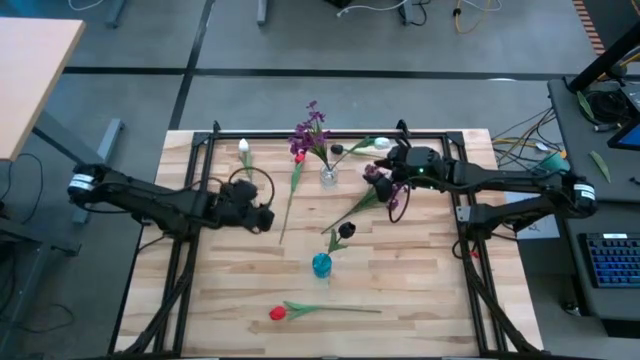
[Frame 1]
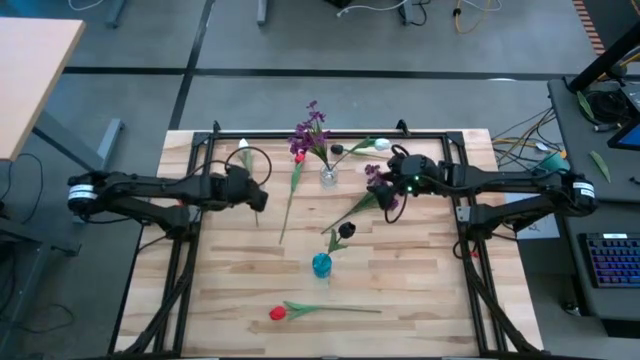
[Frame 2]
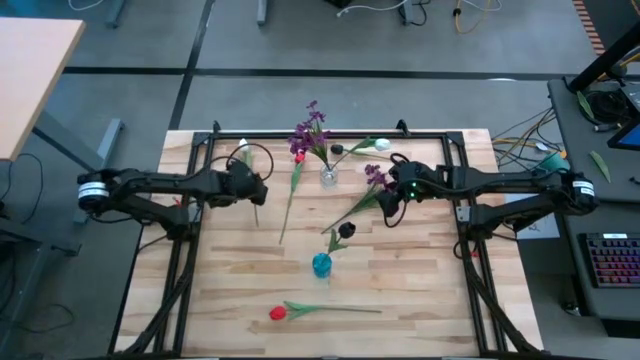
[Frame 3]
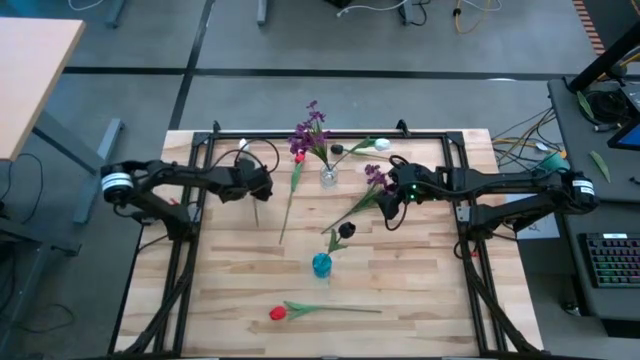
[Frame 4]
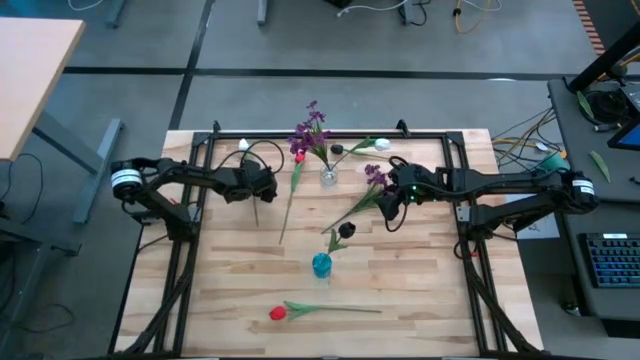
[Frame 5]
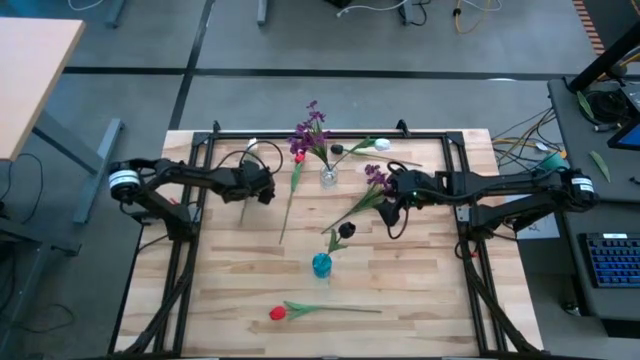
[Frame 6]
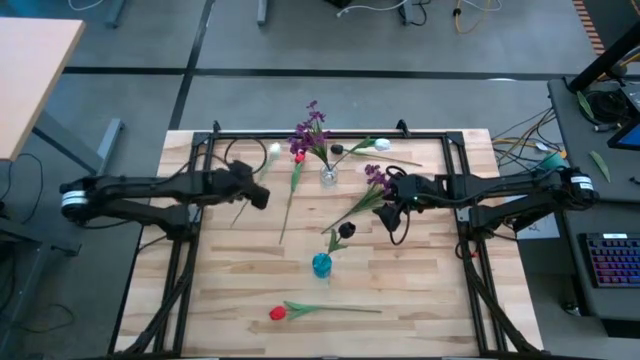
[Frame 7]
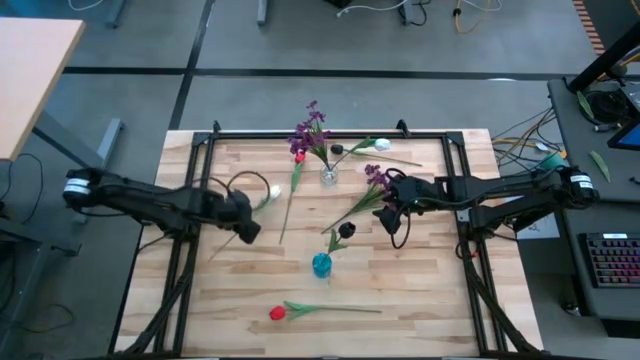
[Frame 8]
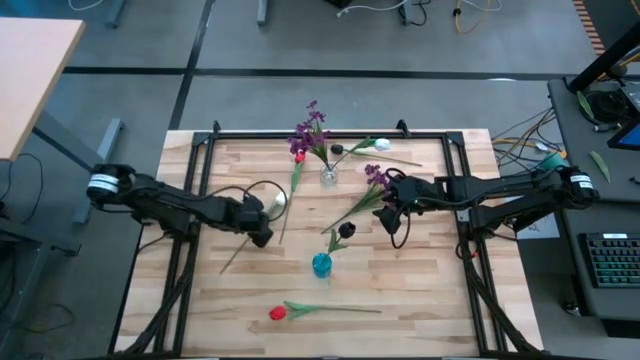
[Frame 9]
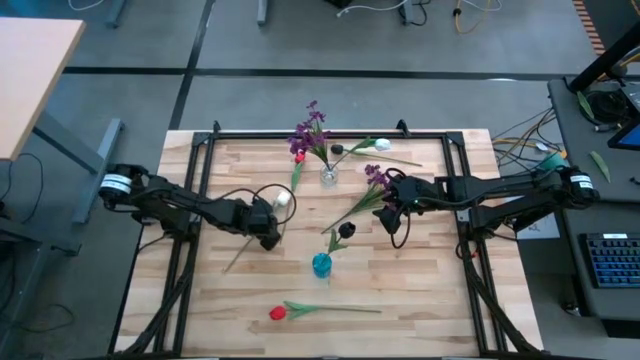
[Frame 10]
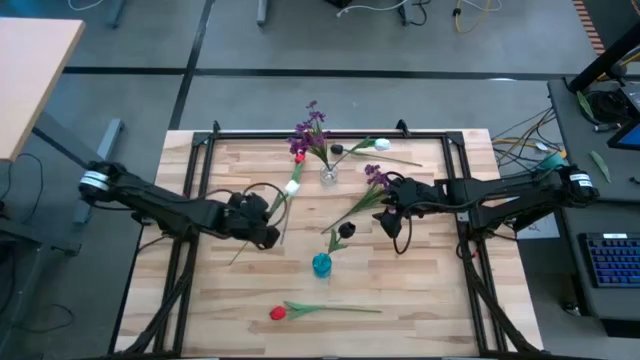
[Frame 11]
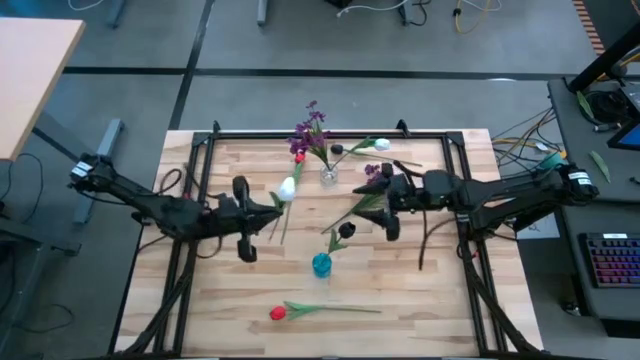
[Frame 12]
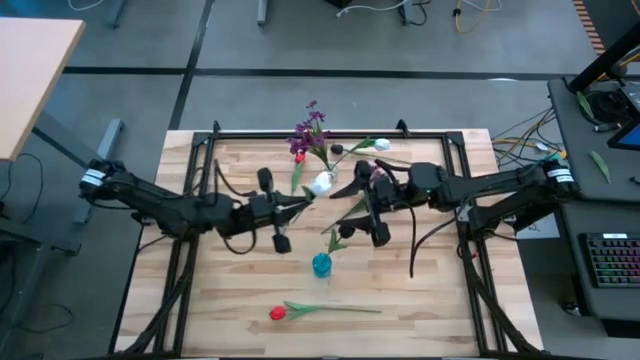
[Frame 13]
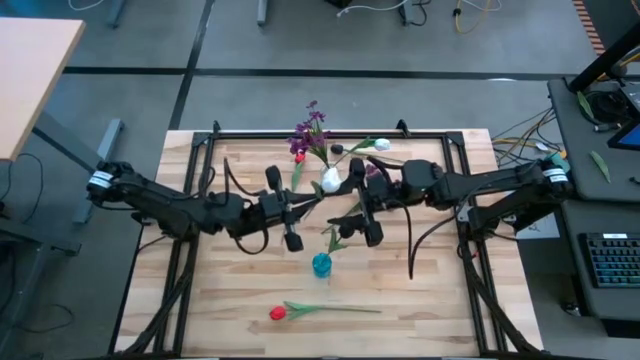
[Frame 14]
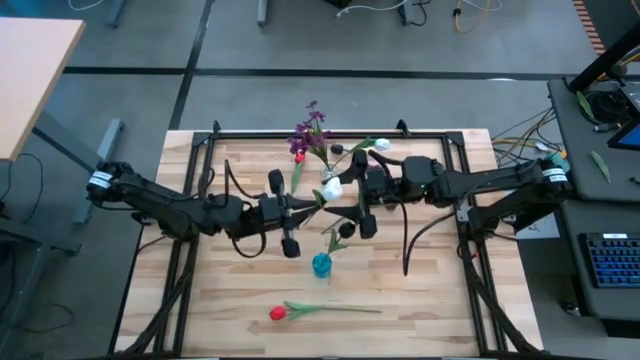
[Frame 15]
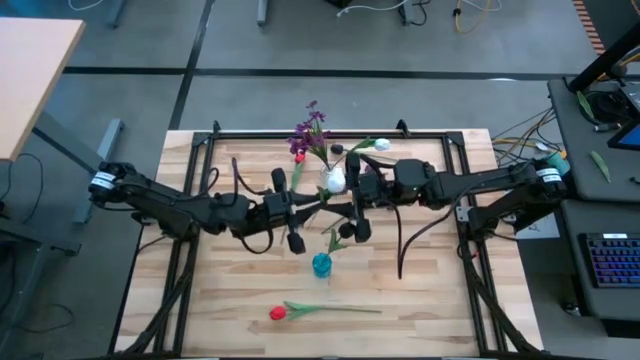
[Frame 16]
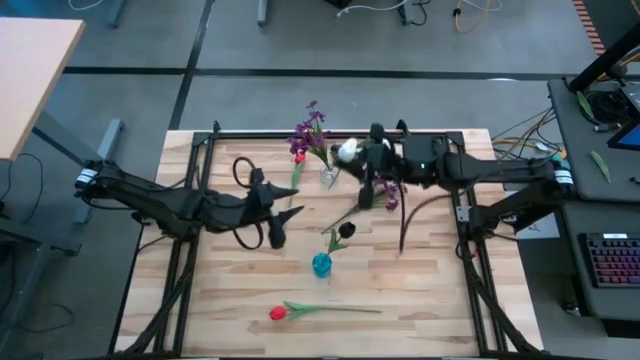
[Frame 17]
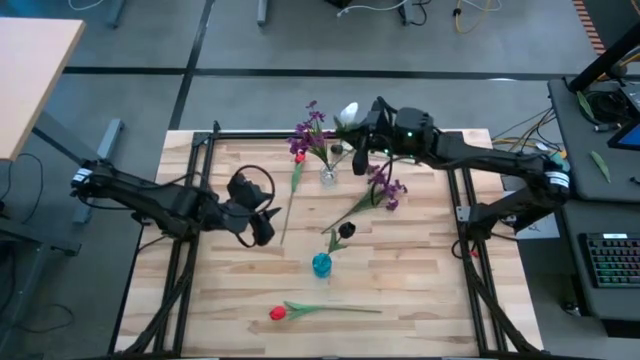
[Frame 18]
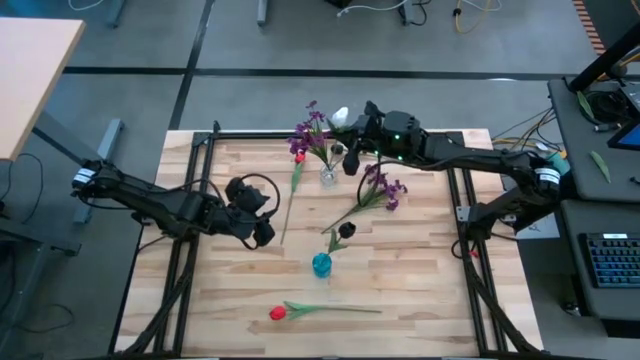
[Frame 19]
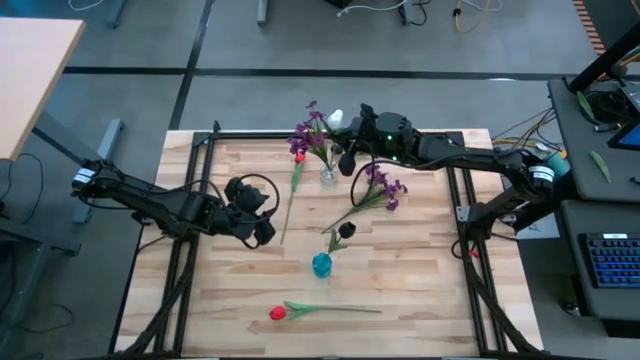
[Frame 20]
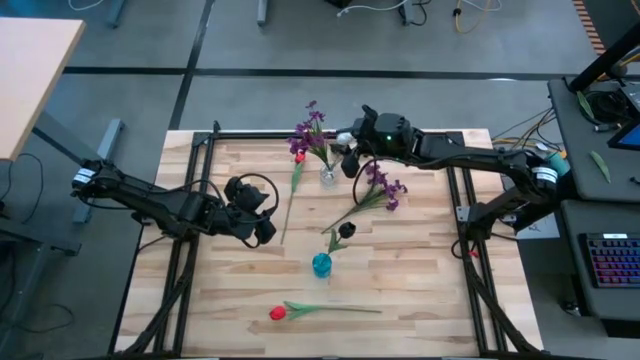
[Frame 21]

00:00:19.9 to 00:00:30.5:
Task: Sort flowers into vase by color
Put the white flower into the transparent vase

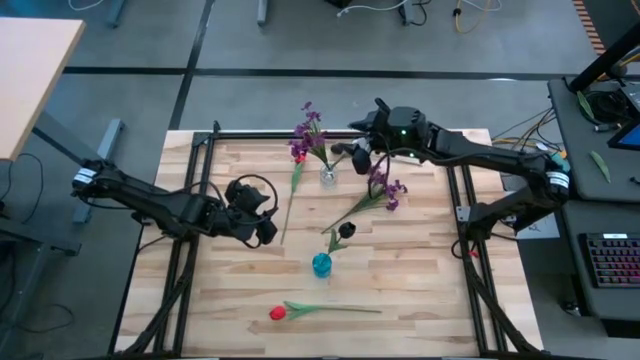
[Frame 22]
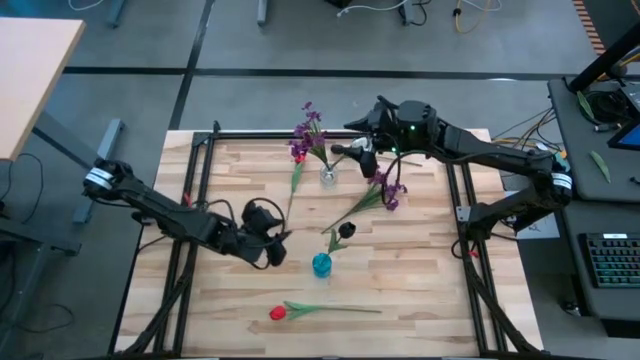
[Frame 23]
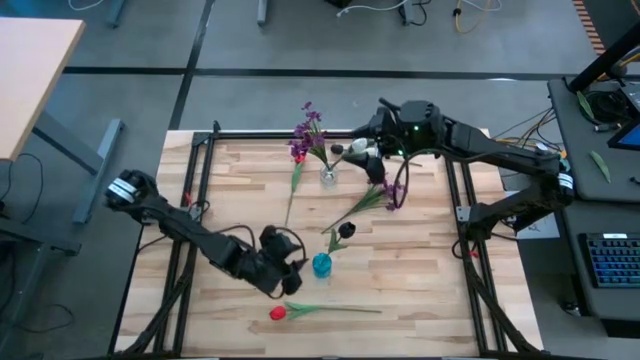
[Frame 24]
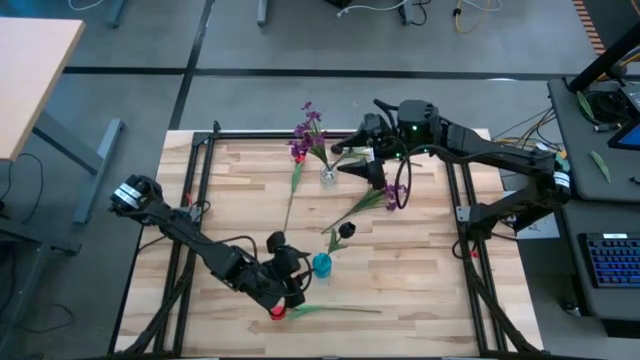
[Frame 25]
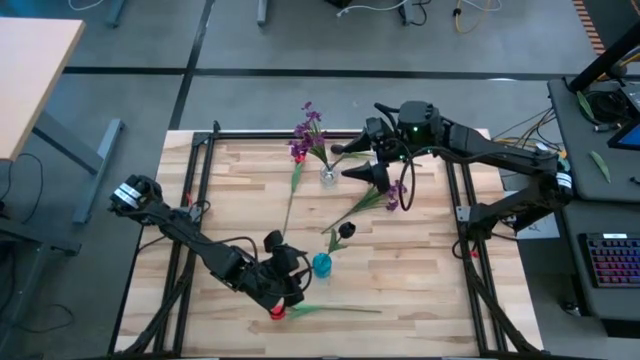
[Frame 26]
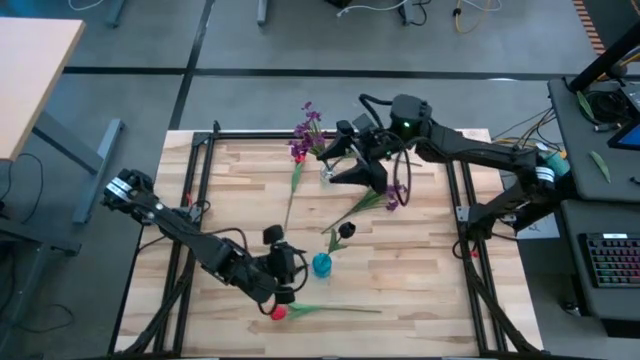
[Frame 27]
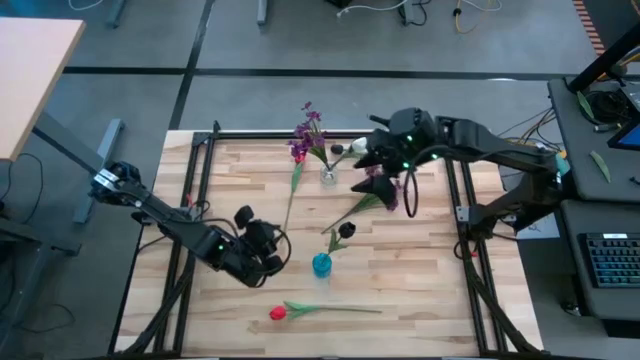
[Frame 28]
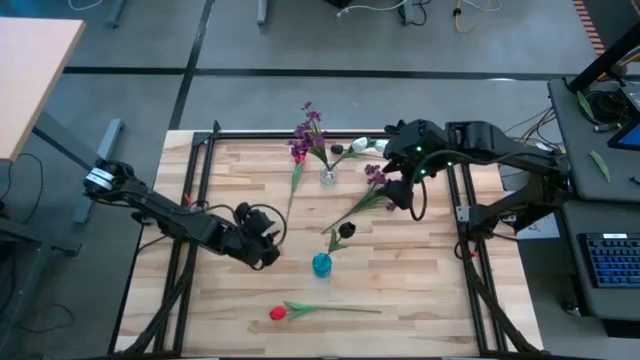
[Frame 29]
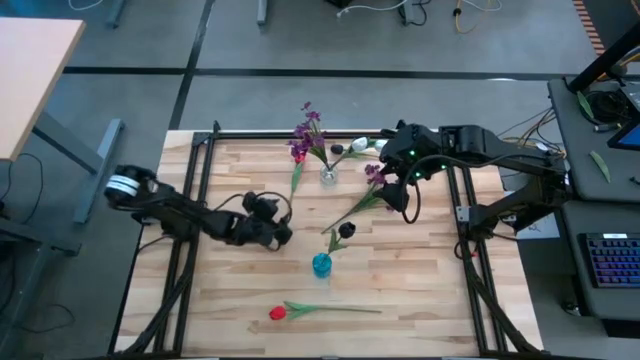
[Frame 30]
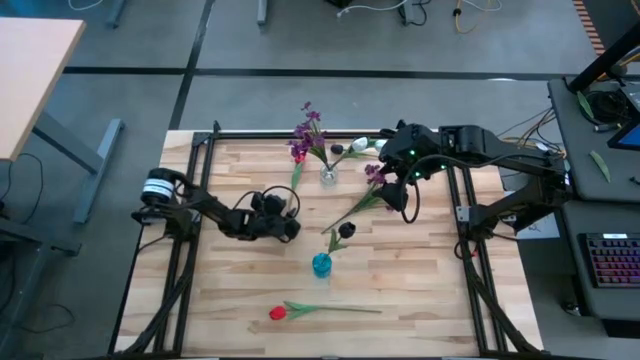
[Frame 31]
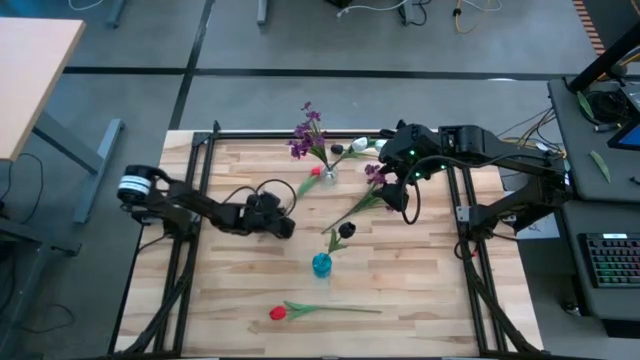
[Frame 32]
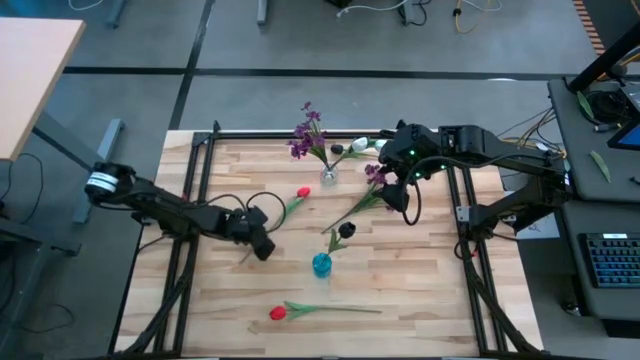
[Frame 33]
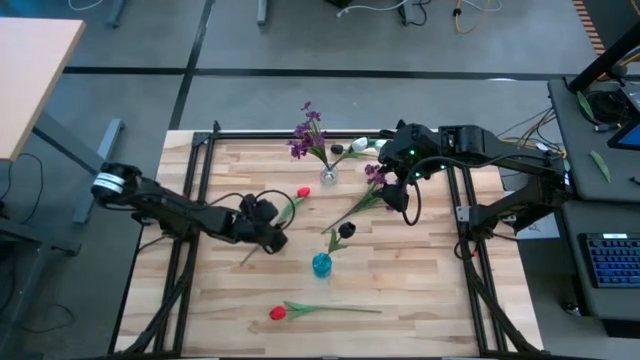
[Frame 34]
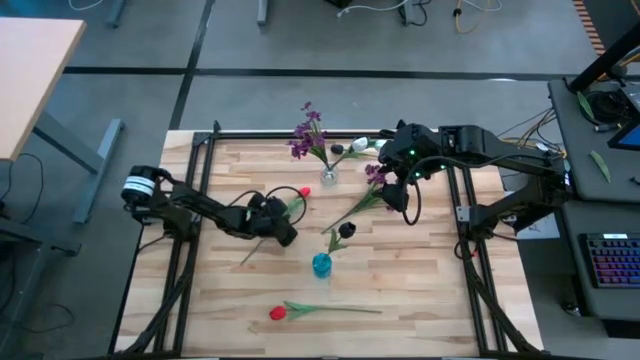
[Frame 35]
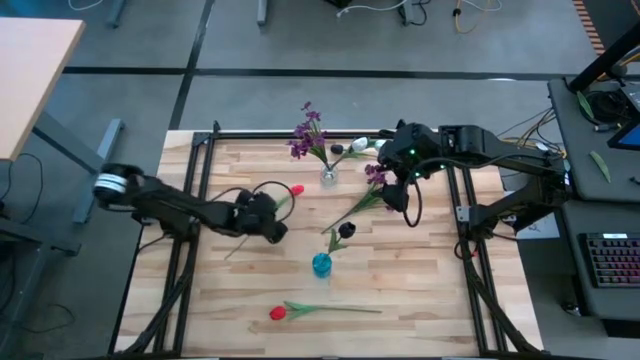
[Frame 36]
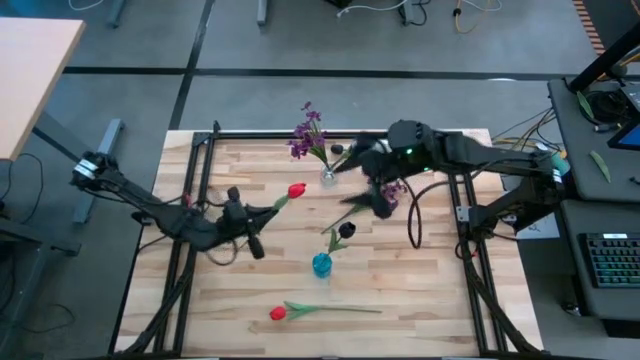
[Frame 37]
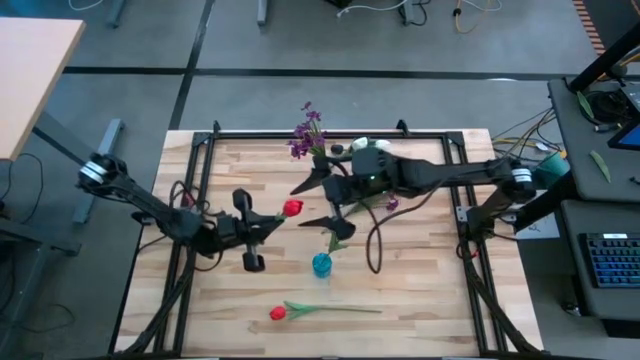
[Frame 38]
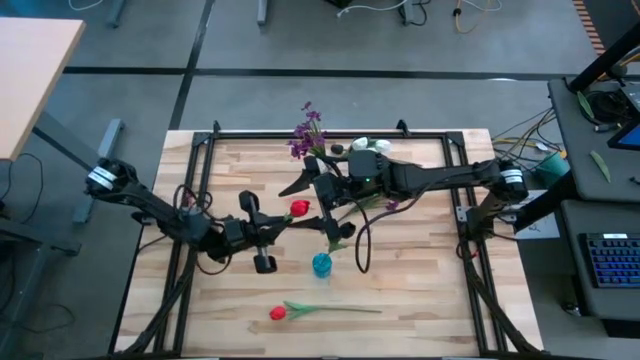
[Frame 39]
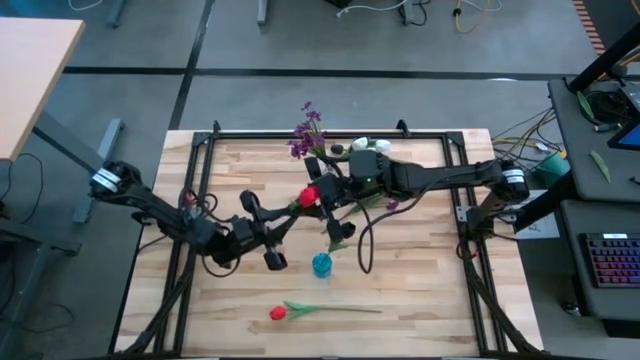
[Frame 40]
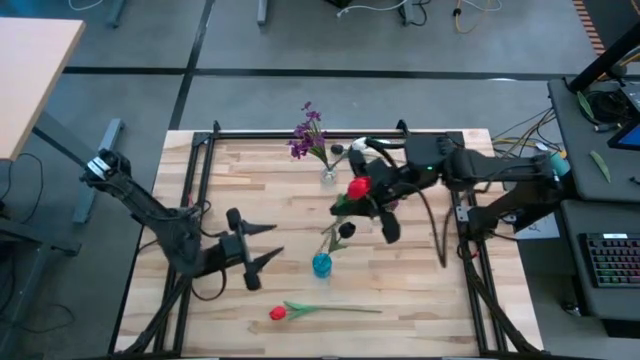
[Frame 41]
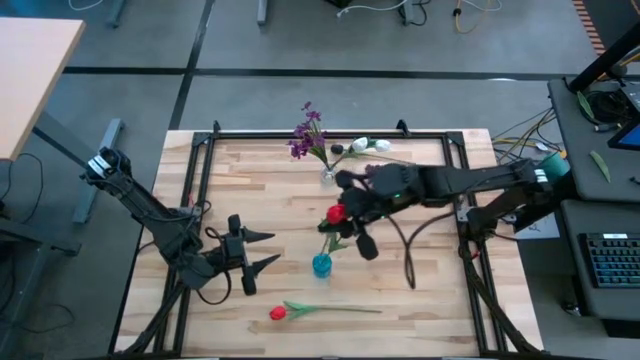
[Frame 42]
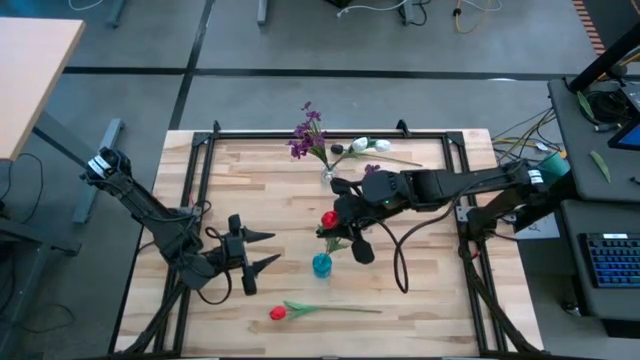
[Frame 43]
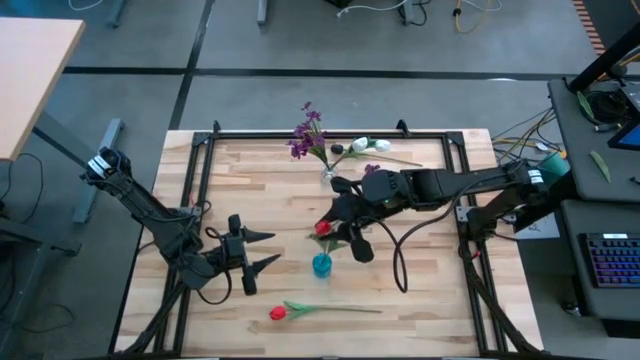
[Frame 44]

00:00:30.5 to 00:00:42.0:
Put the top red flower into the blue vase
